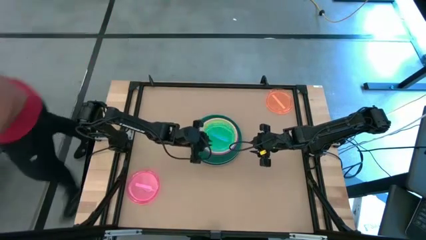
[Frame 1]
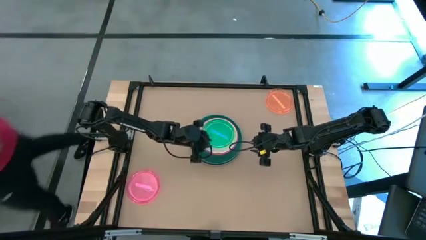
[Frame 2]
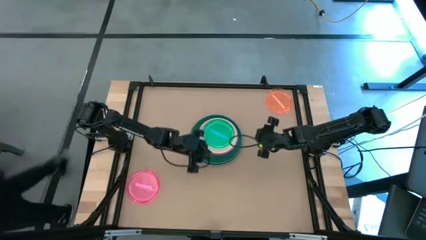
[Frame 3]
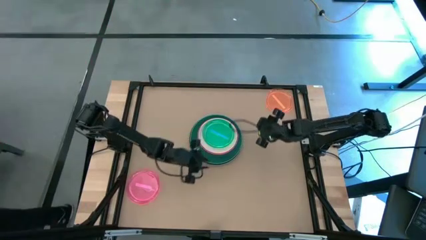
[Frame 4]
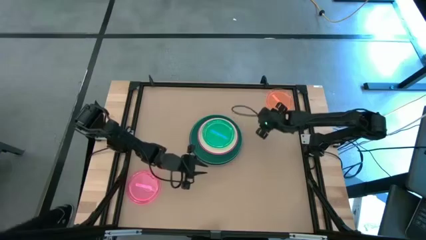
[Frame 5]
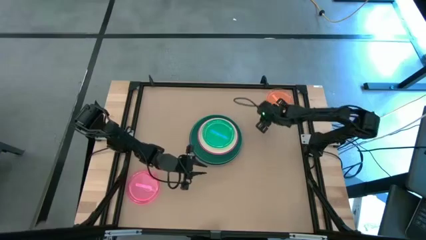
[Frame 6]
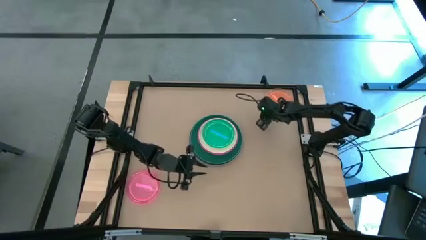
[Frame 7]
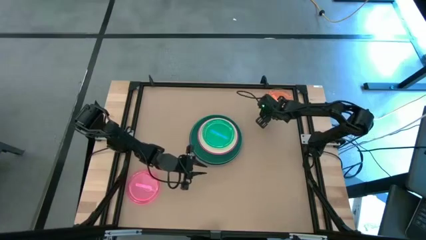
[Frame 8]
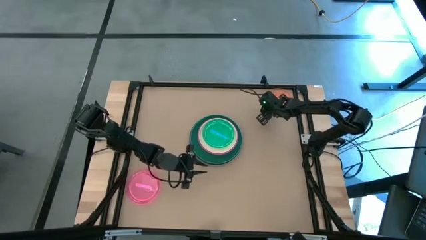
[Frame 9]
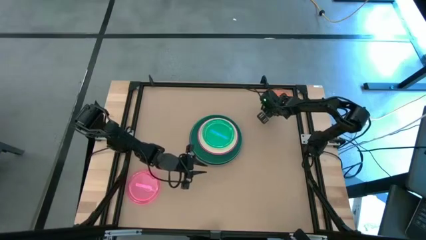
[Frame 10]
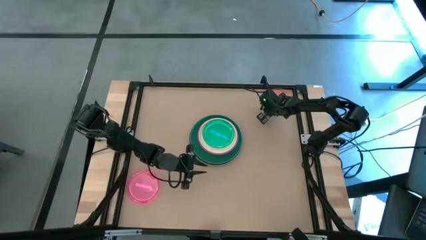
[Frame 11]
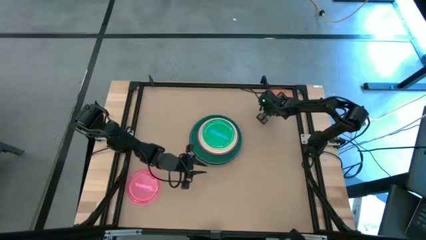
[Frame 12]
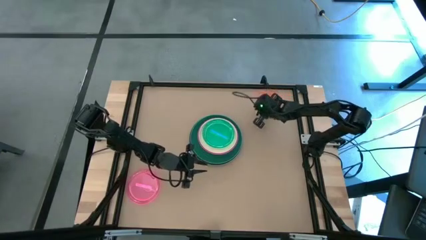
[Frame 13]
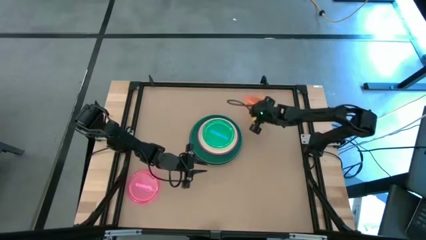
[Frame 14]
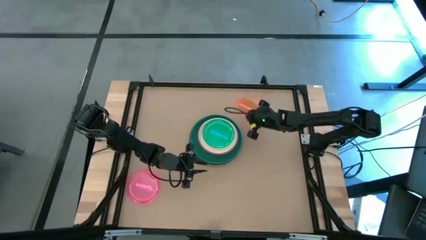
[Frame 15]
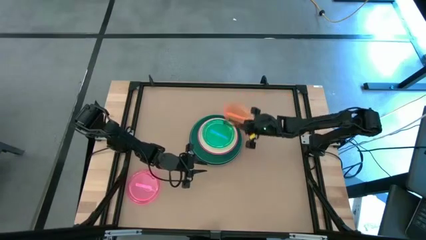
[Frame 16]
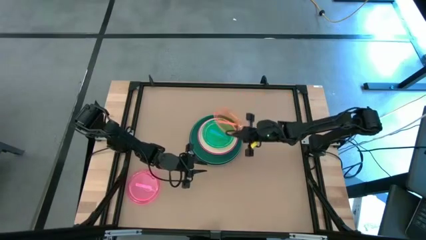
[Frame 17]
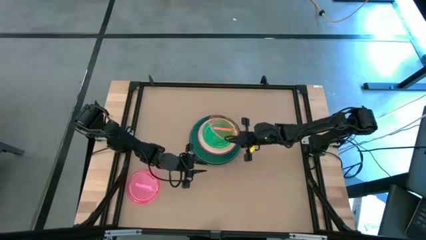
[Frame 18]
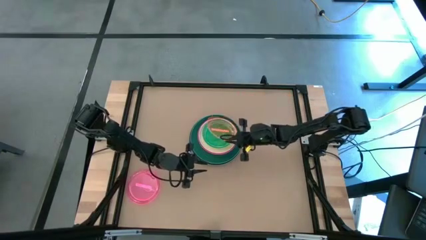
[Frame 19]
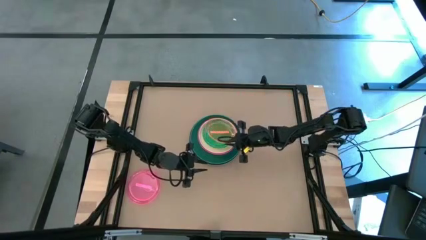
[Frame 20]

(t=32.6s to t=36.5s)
Task: Stack plastic plates
Stack the orange plate on the blue plate

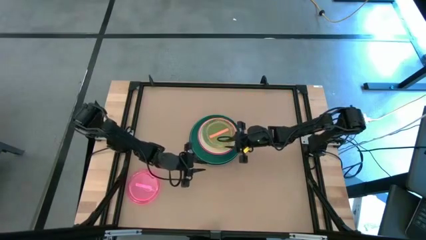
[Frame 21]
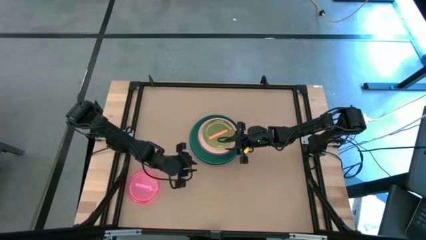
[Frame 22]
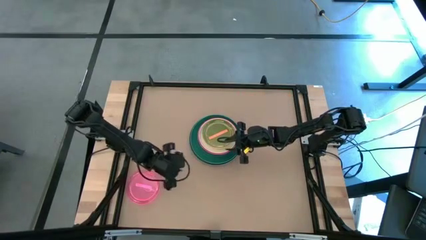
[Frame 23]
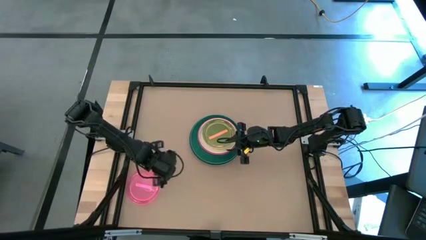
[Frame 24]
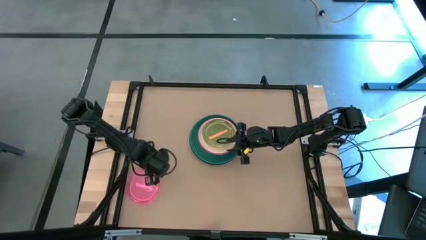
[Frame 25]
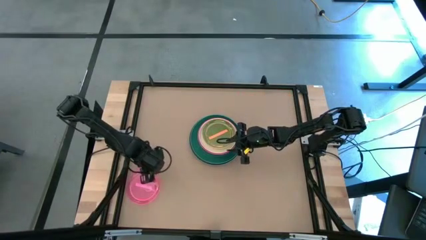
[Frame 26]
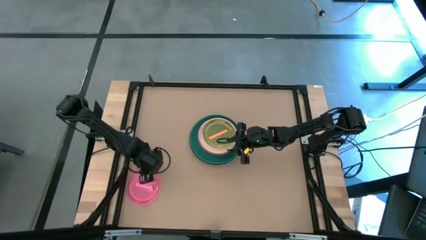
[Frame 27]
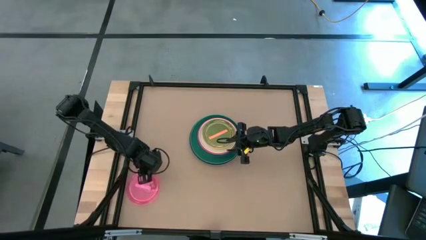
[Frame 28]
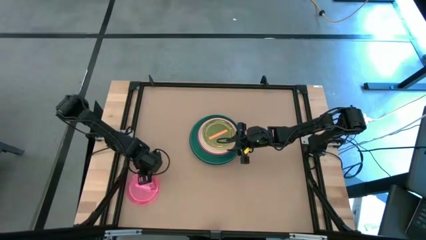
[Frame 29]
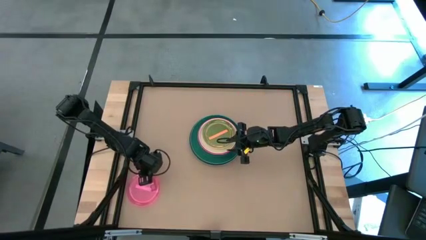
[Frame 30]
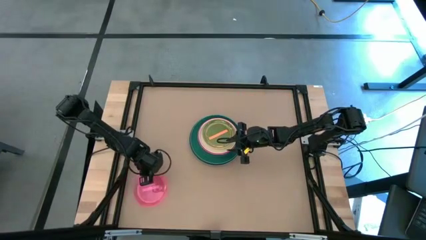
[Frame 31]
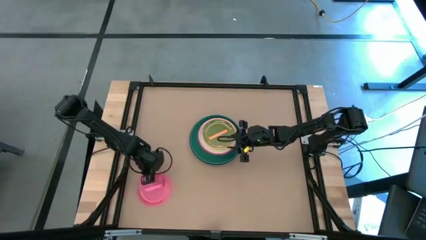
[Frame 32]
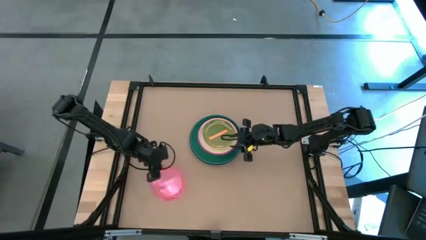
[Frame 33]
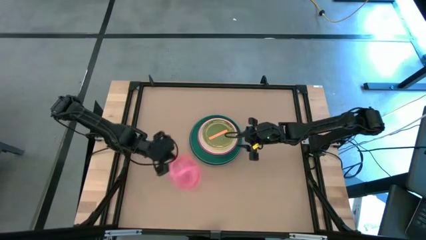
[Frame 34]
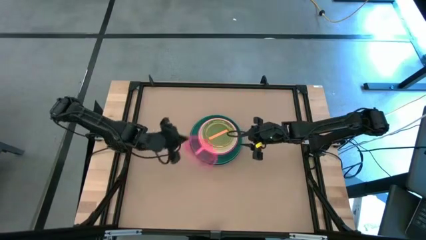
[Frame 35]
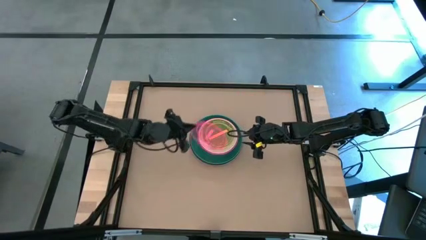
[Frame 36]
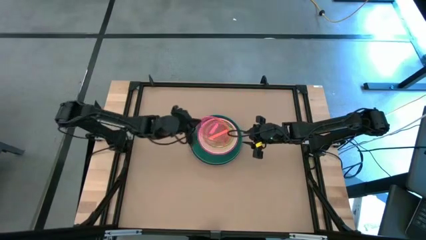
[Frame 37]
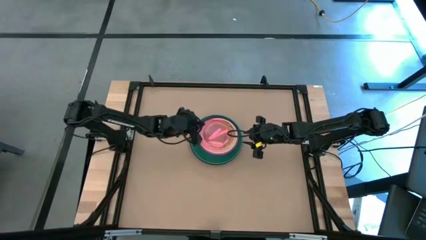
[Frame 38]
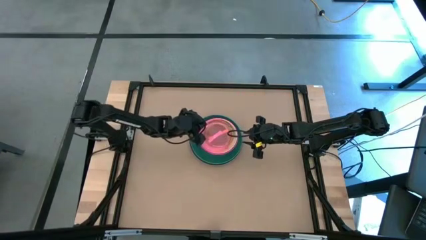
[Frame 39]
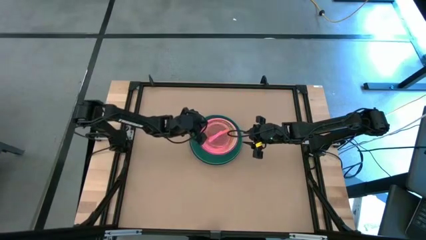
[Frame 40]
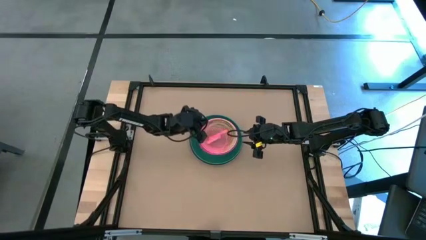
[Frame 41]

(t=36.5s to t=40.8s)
Stack the pink plate on the orange plate

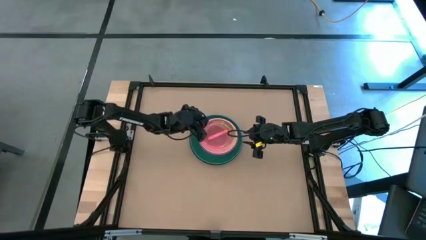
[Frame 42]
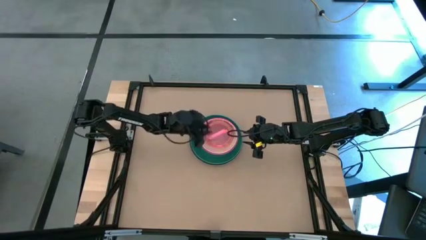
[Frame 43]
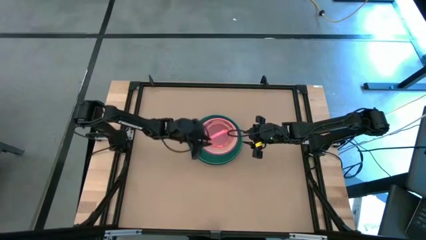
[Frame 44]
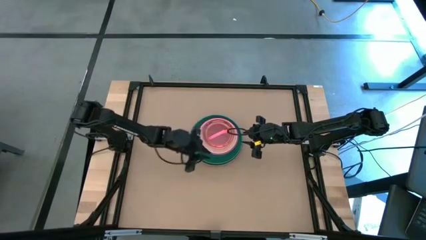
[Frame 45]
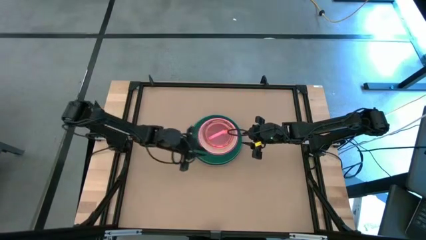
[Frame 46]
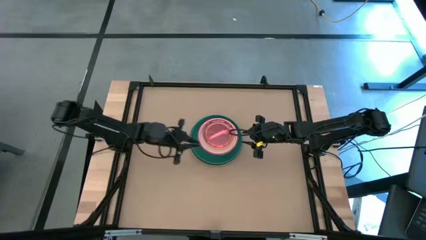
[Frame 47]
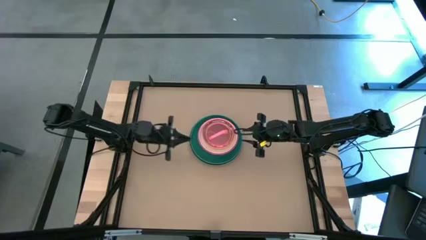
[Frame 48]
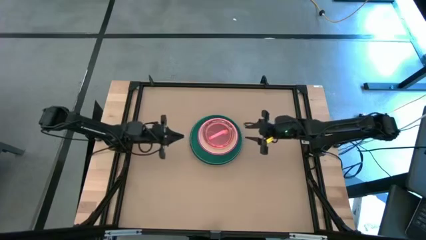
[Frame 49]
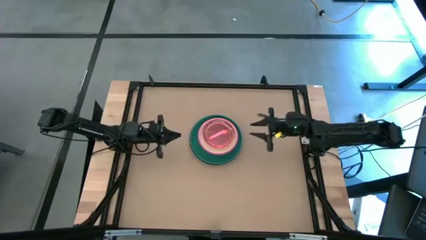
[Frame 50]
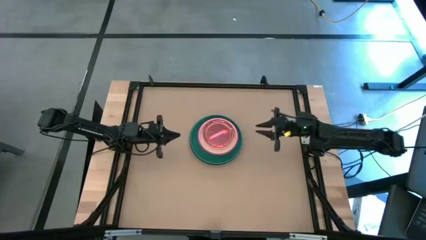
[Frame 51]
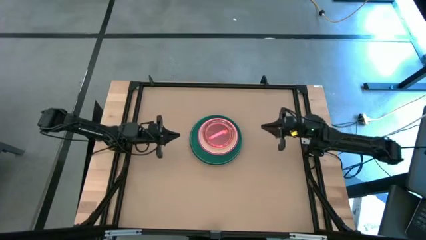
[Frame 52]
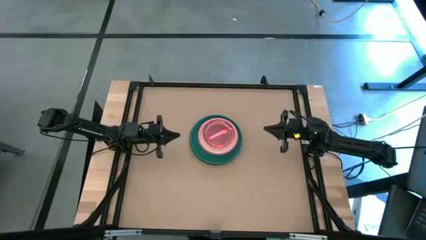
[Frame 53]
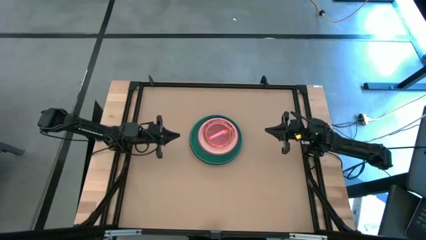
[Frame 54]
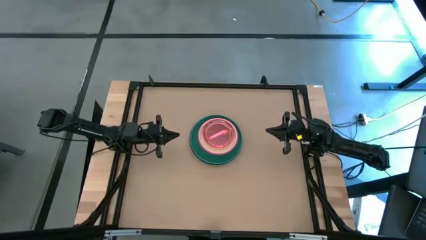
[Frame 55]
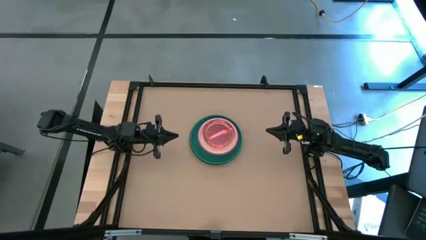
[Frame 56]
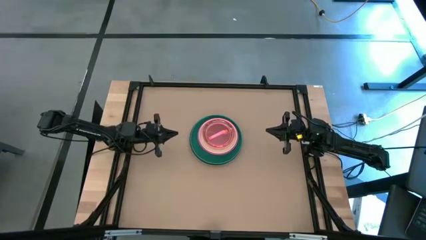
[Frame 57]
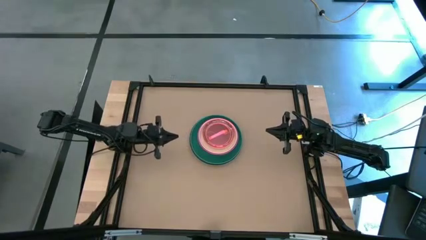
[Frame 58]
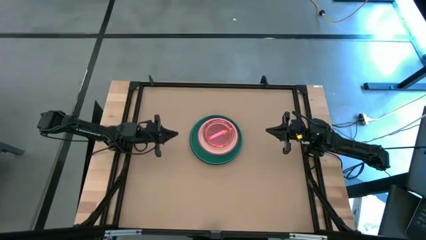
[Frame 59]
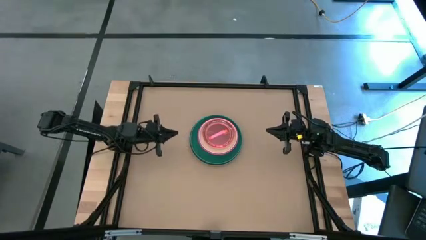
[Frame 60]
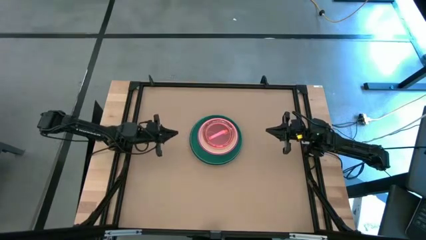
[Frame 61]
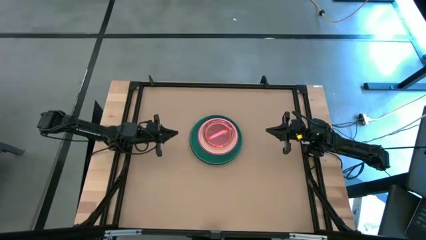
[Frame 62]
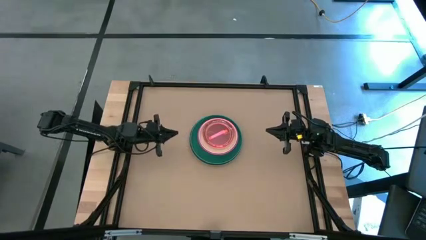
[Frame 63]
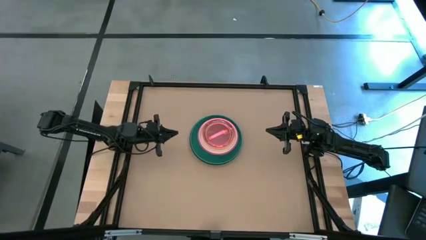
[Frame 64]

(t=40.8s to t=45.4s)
Return to Home Position

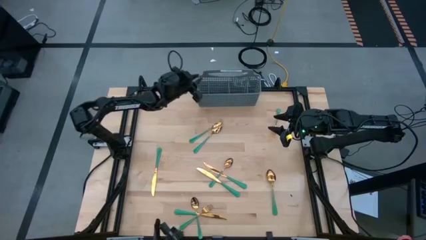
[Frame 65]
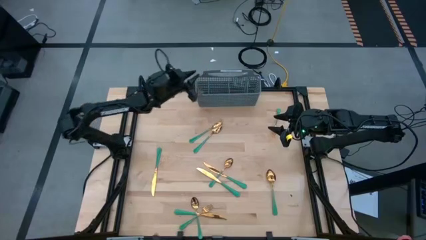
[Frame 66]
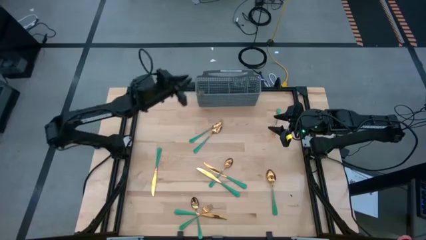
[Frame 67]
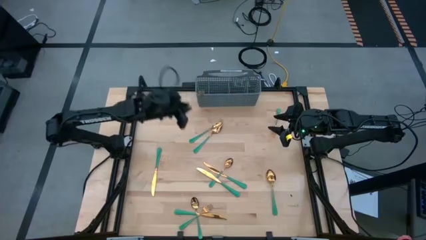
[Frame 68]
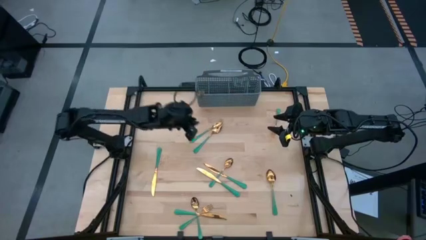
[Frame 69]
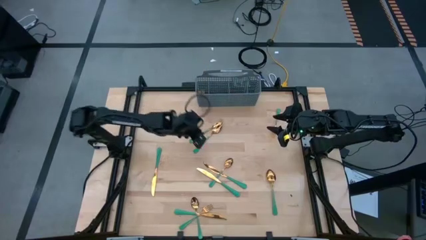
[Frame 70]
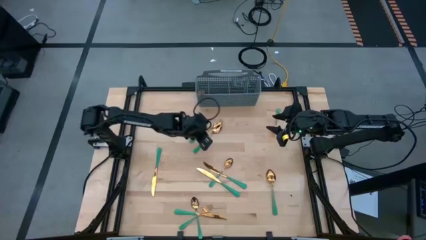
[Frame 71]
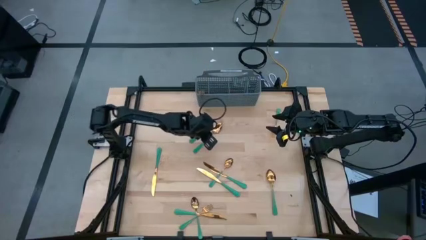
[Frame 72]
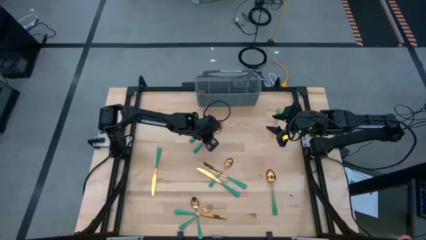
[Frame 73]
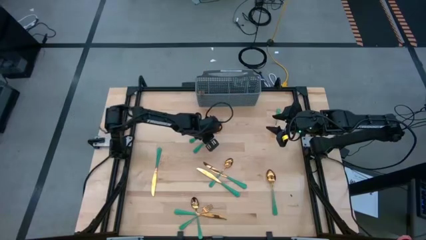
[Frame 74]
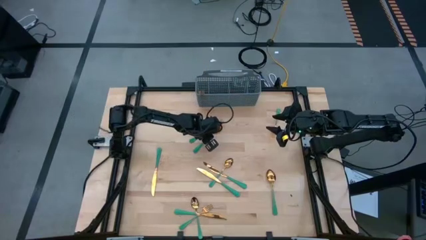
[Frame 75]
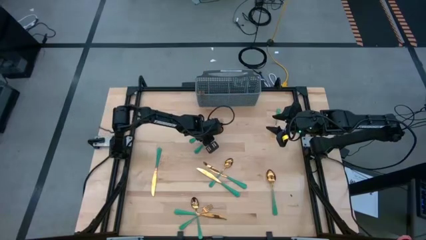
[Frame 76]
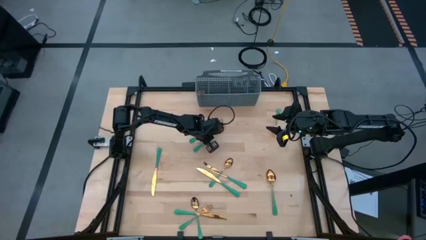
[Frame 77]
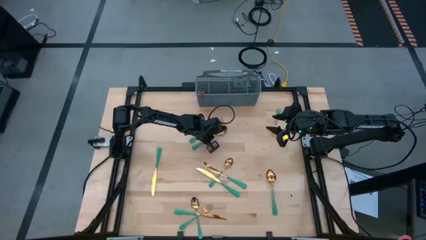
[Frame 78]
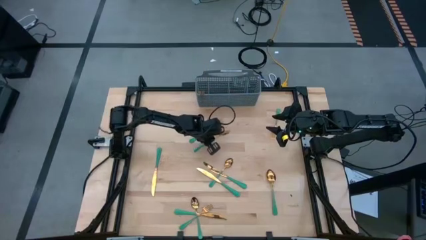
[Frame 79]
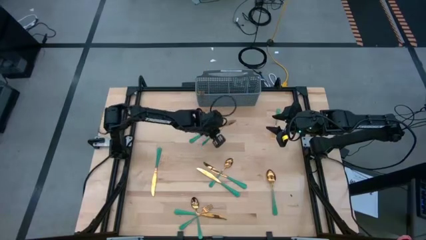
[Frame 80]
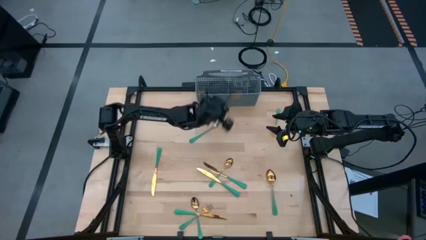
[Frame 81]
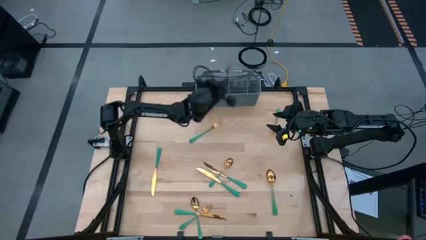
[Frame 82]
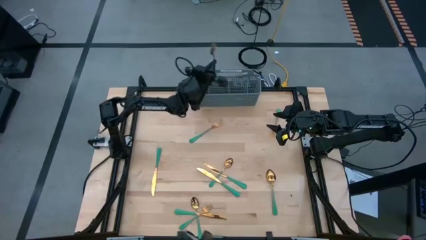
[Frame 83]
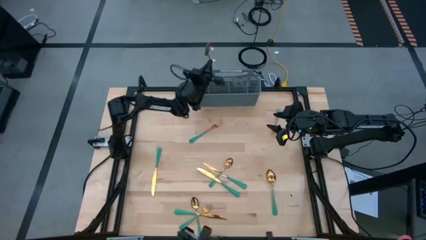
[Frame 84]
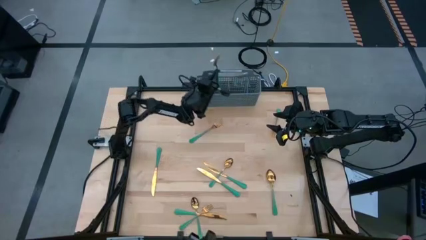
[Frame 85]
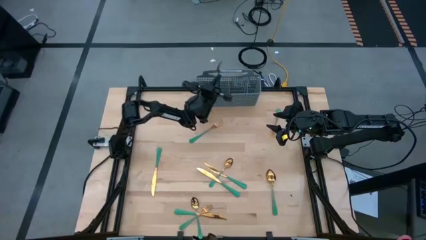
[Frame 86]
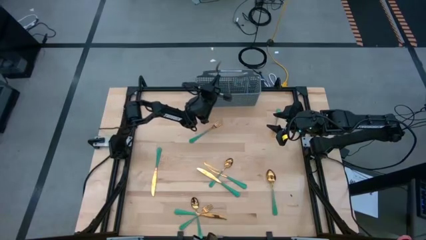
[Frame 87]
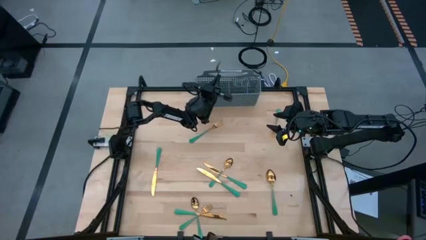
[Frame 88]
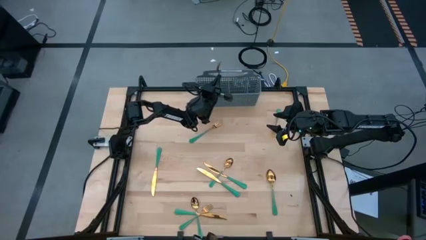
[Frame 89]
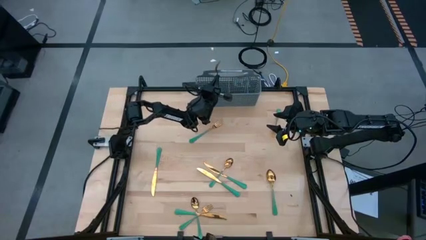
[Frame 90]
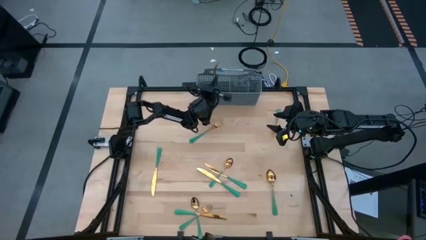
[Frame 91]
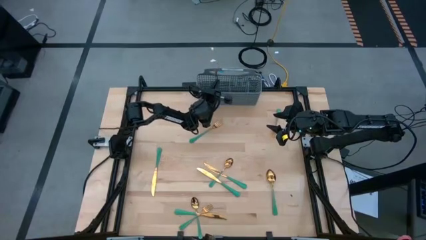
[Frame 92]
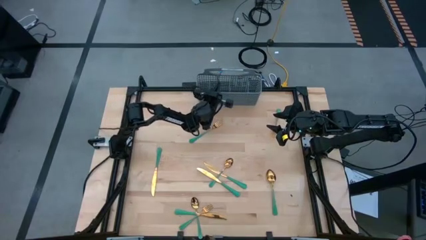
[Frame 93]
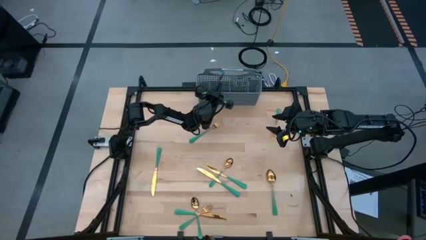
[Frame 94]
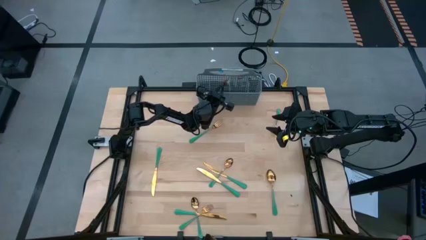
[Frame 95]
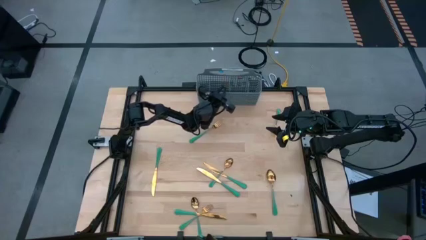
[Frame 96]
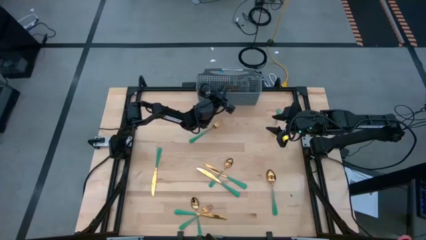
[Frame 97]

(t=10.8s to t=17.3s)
Task: Sort silverware
Put the green spoon into the gray silverware basket
